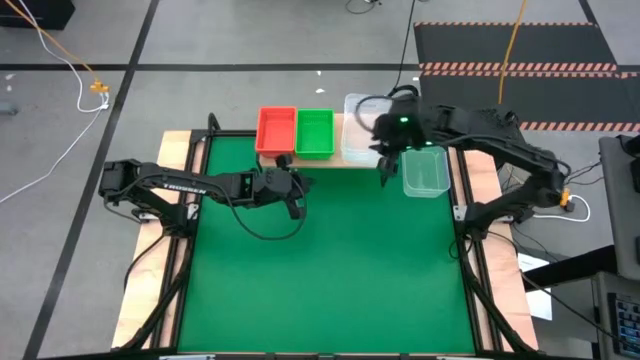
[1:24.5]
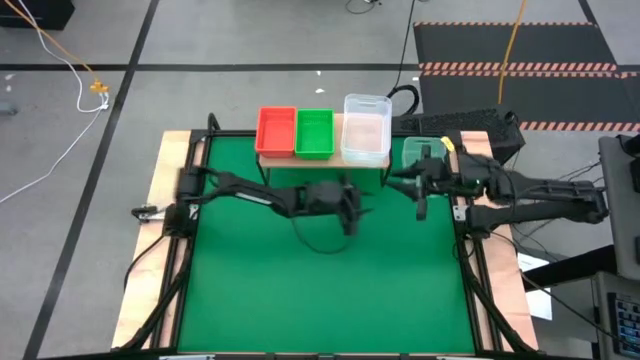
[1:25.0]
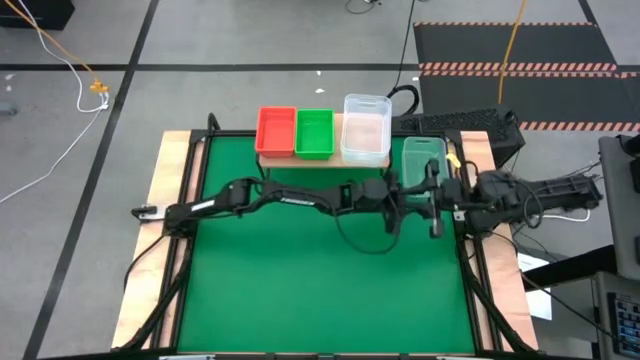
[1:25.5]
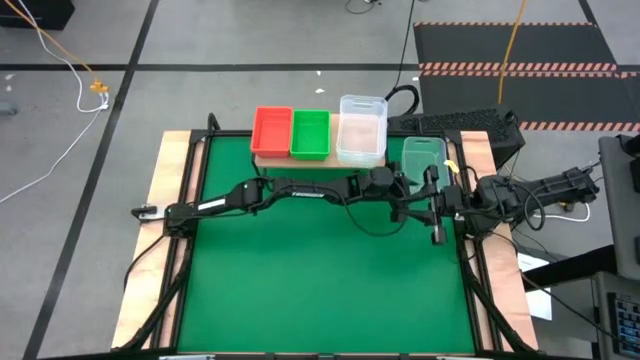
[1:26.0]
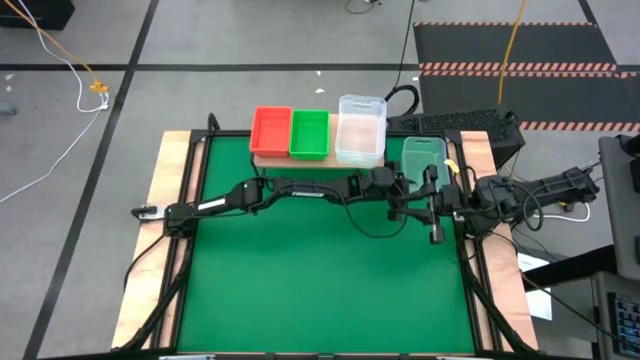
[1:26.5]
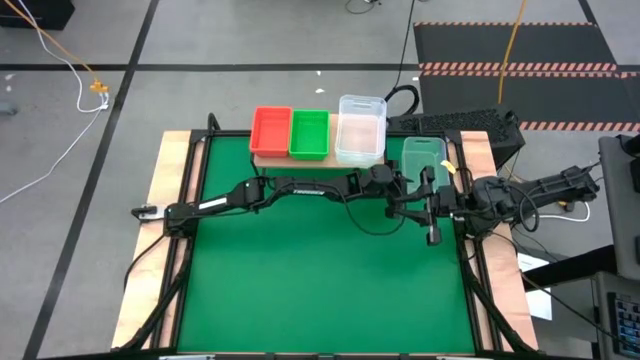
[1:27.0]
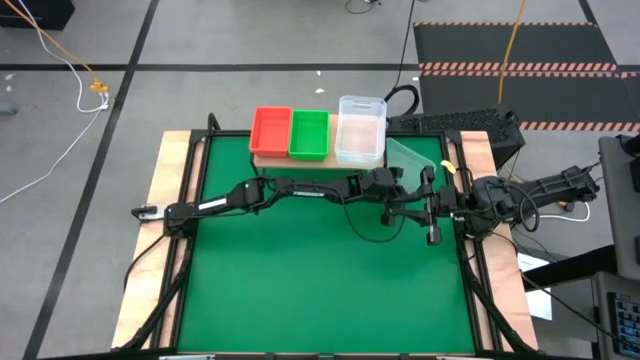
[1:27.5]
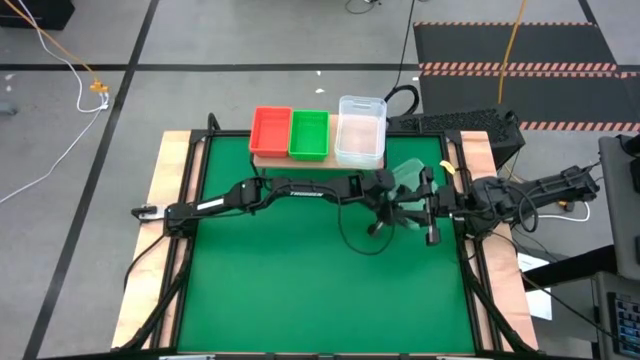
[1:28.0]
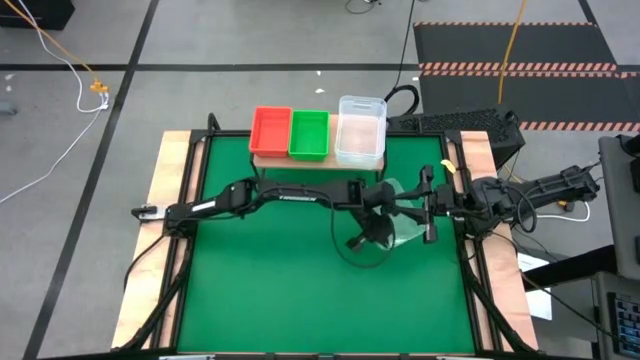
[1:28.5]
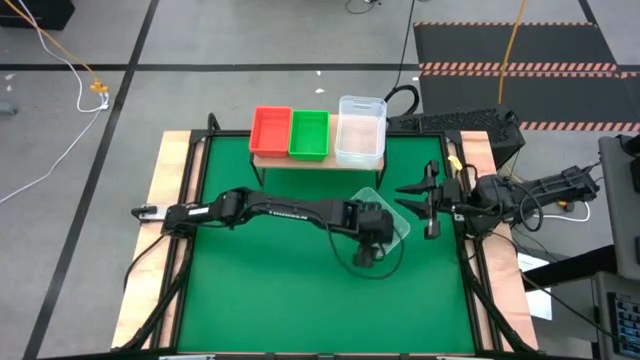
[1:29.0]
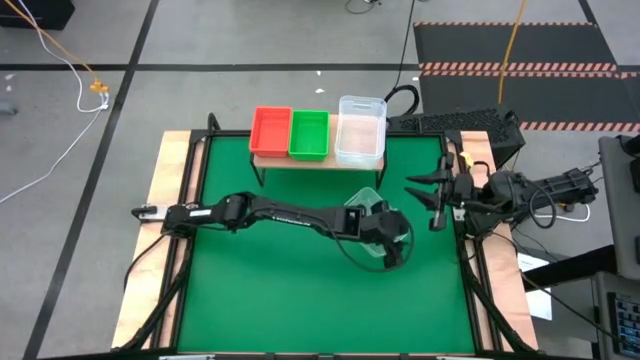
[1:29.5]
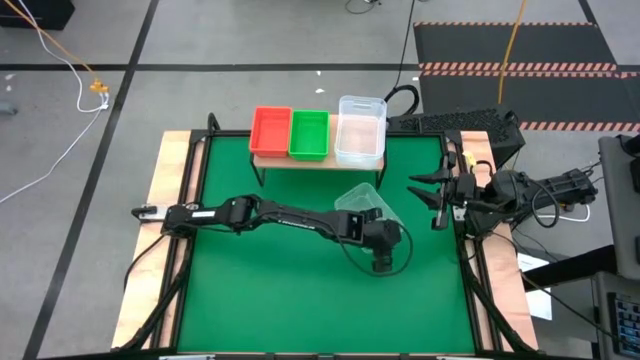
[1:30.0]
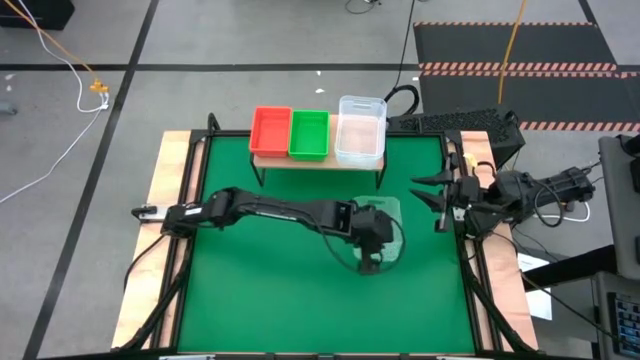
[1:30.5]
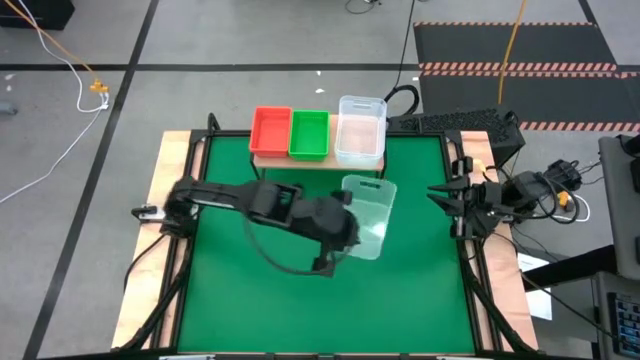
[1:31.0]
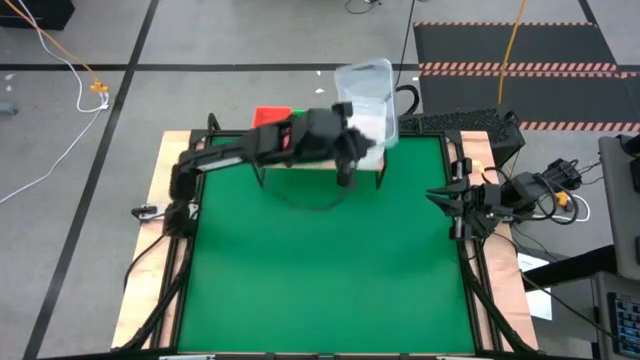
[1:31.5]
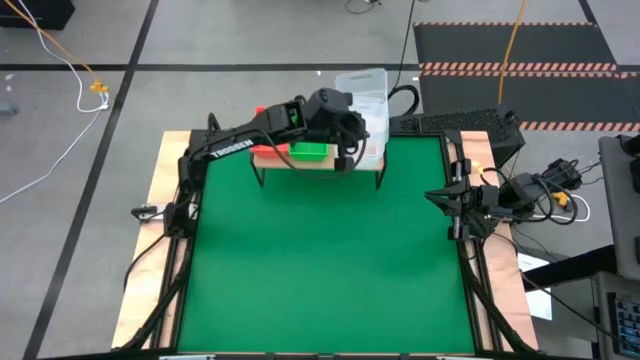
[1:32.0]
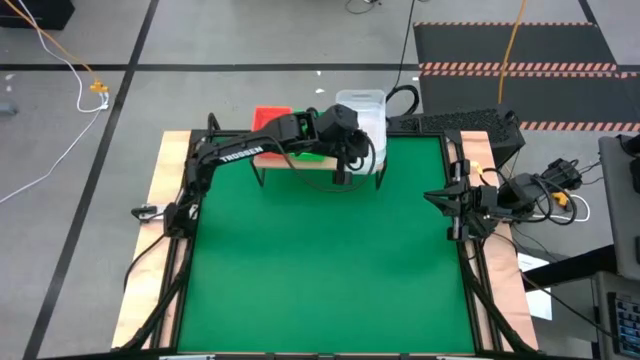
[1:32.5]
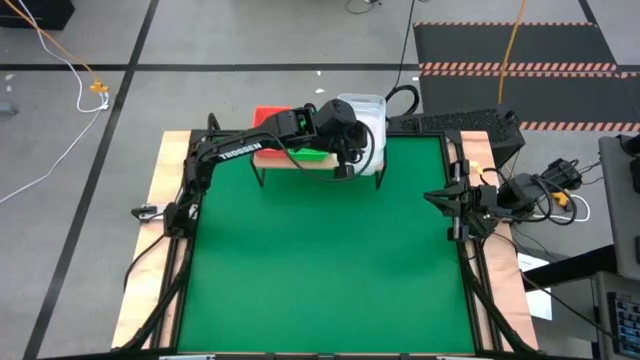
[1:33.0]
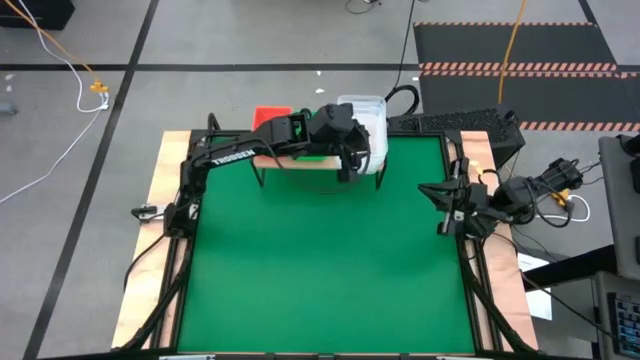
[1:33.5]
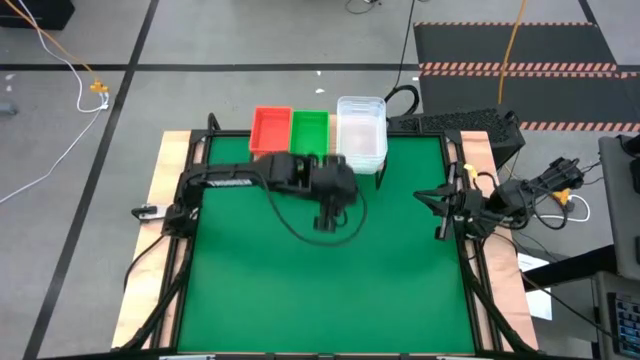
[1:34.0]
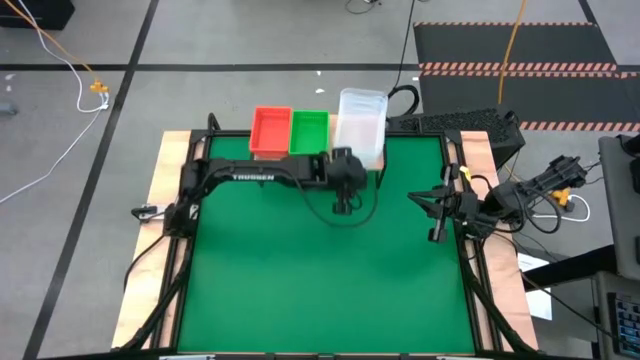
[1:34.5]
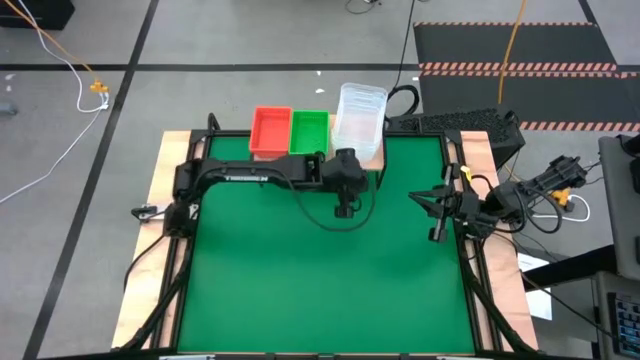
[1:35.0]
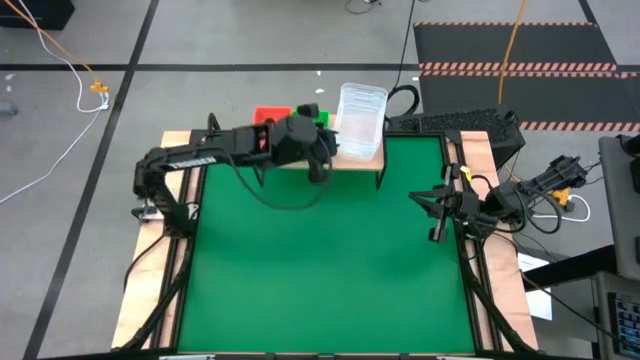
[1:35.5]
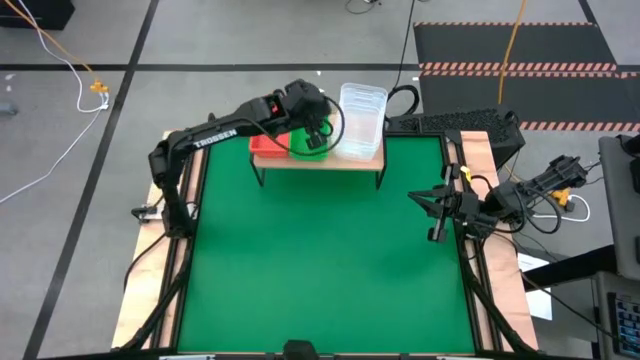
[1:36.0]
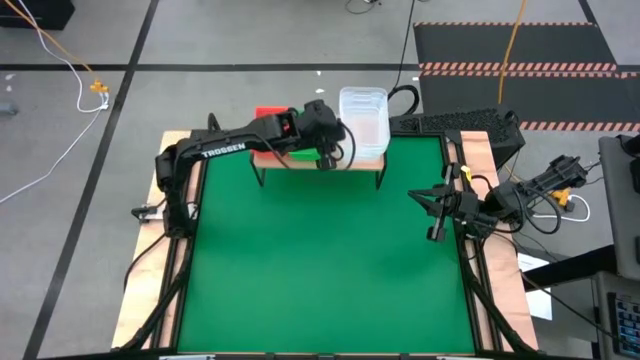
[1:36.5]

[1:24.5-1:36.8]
Task: Stack baskets on shelf by color
Stack the transparent bin on the transparent bin on the shelf

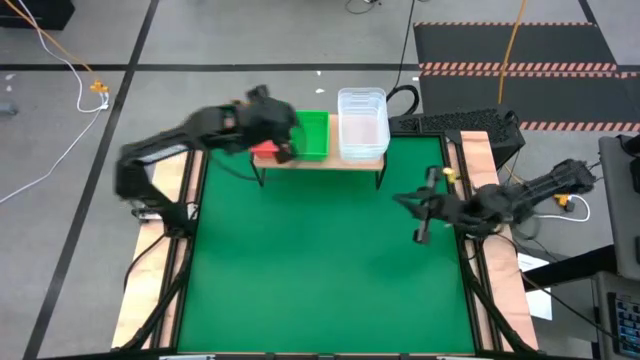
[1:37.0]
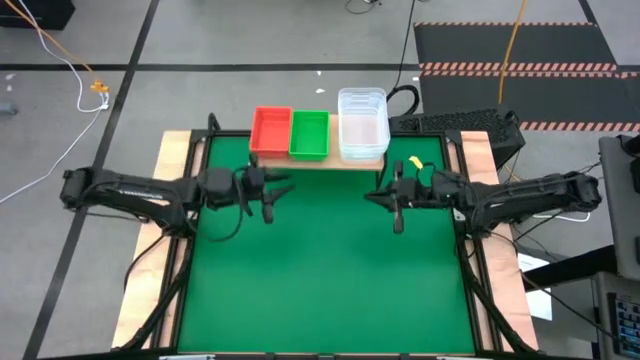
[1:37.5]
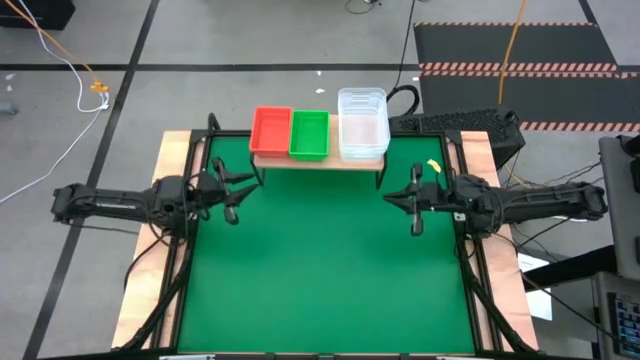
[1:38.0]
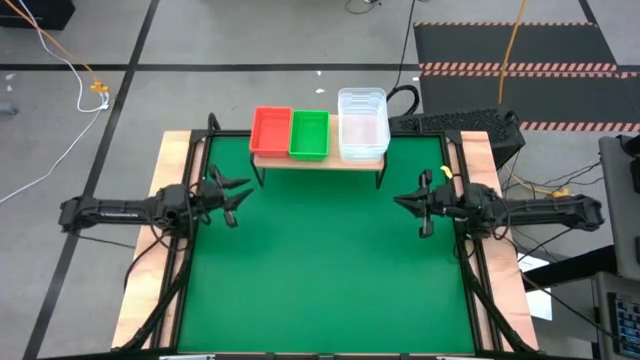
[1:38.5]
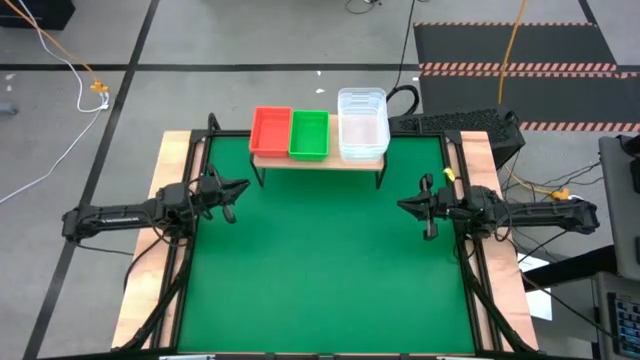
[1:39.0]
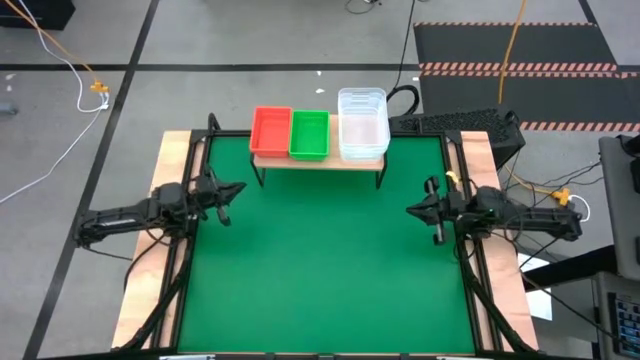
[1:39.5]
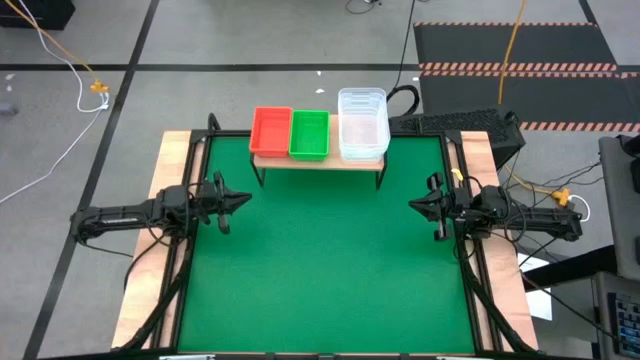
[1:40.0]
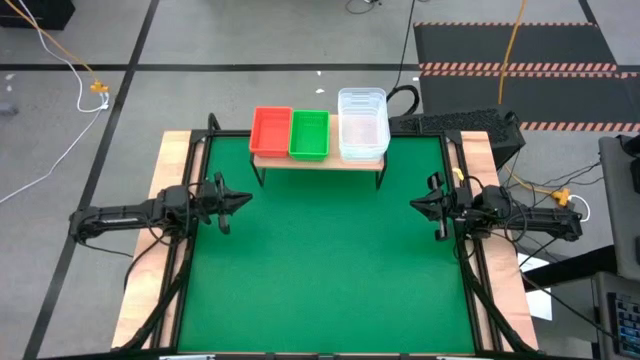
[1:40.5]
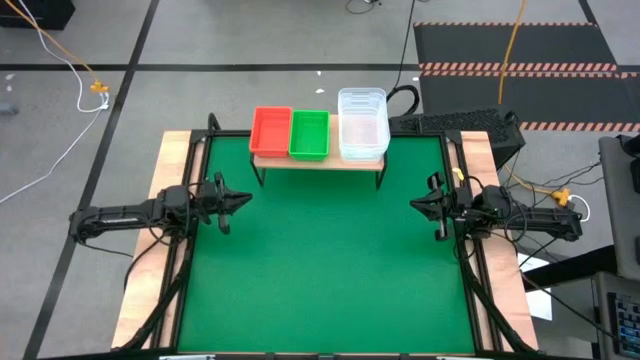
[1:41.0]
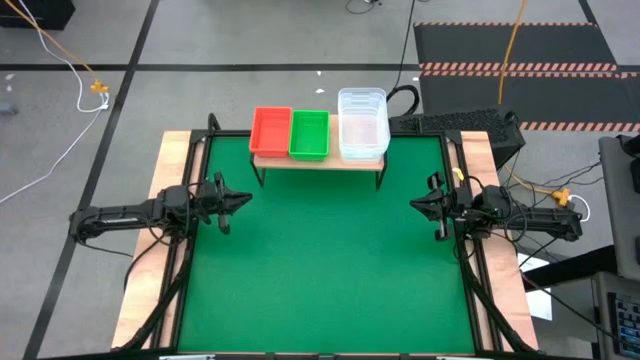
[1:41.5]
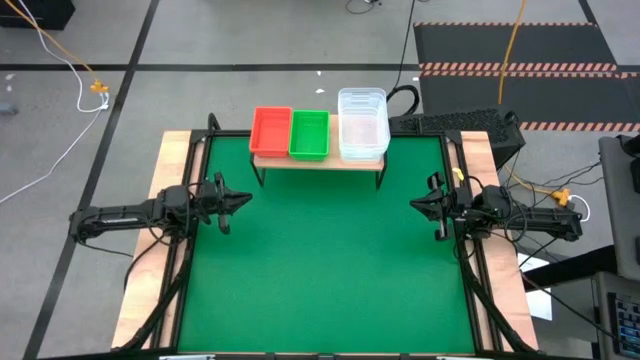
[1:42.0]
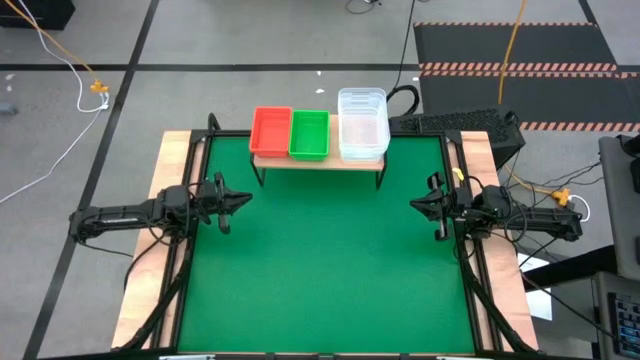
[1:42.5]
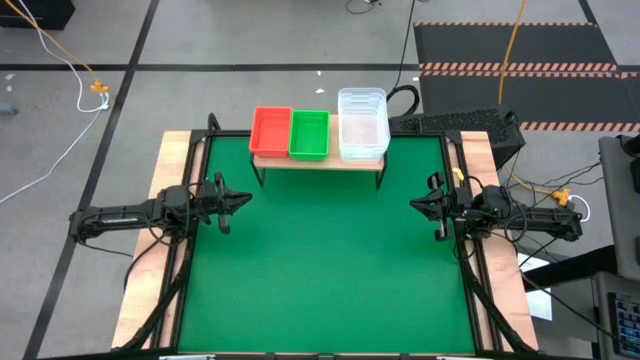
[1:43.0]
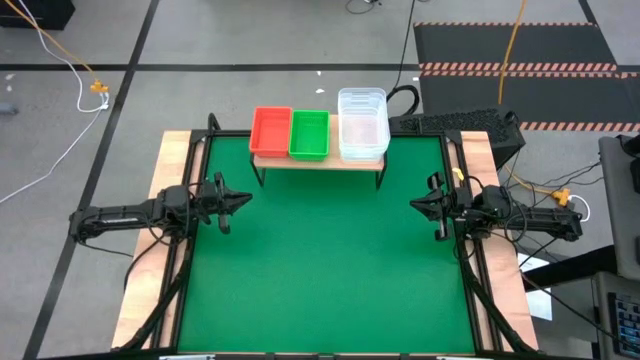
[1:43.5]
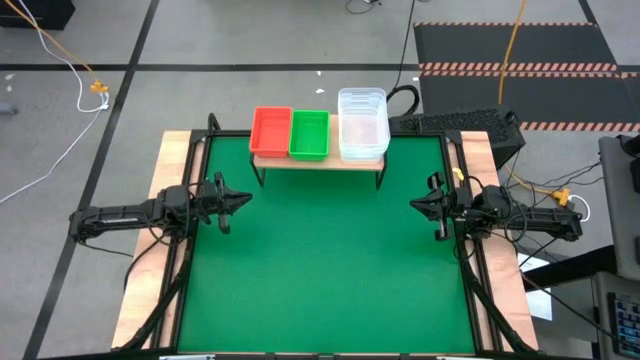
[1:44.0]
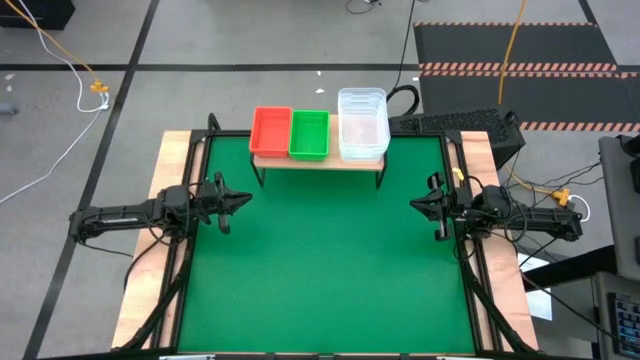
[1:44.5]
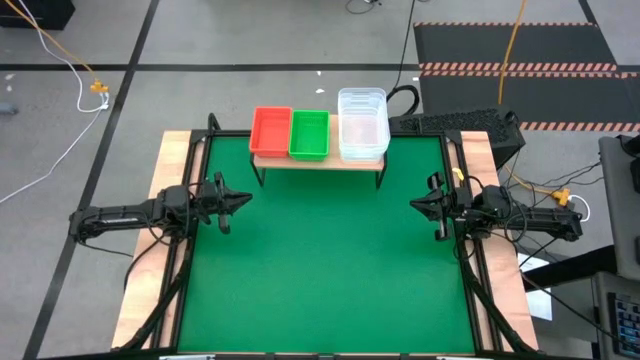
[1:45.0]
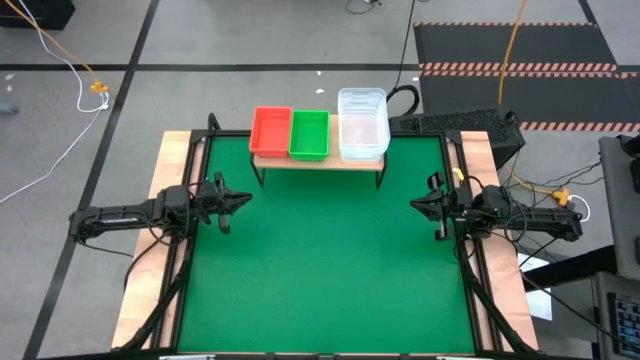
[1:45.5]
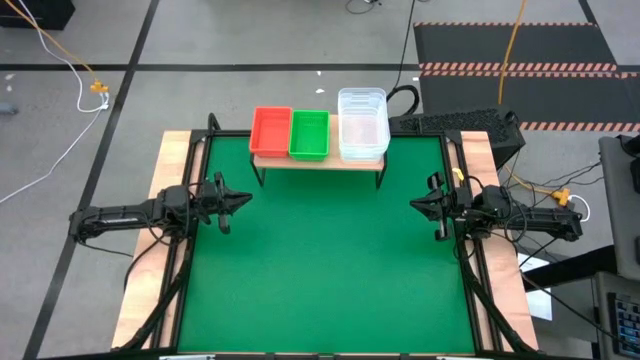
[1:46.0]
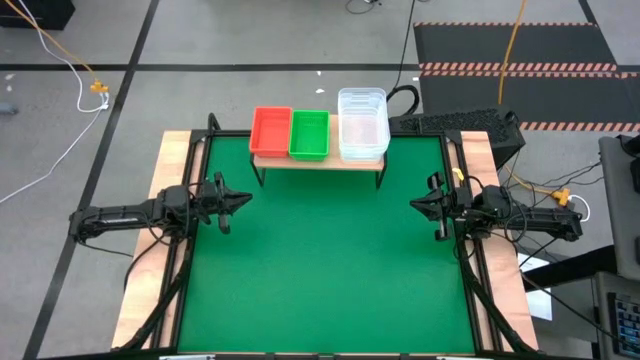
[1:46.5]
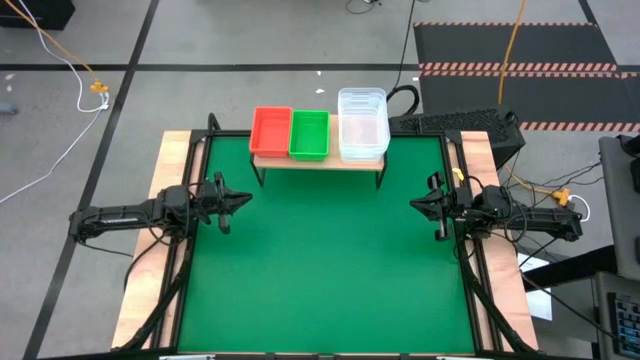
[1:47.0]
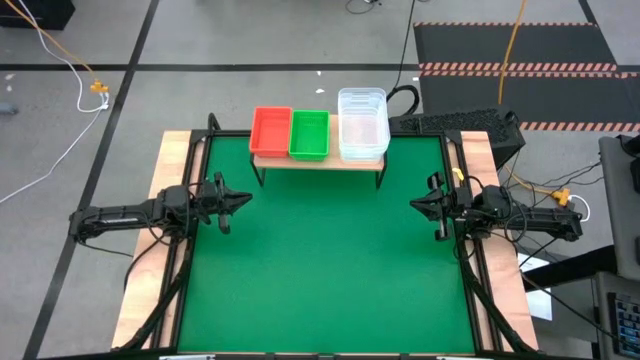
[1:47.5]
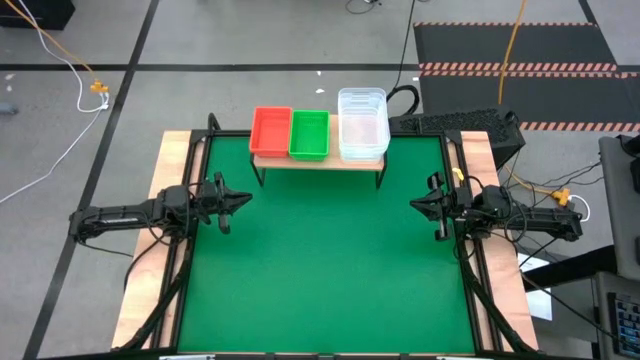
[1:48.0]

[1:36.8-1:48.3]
Return to home position
